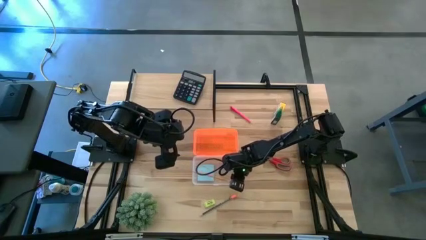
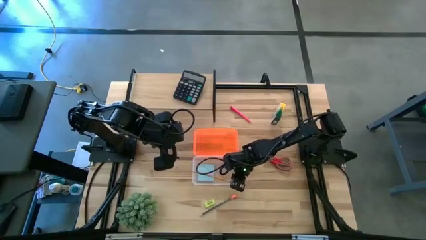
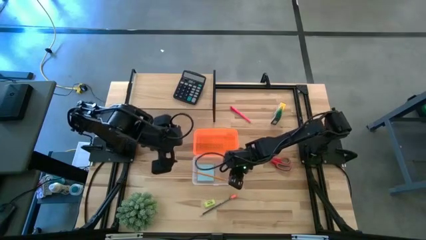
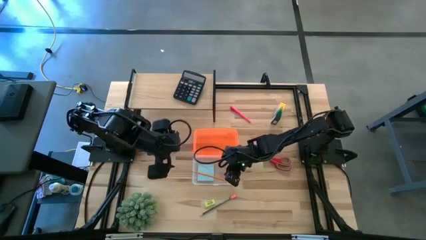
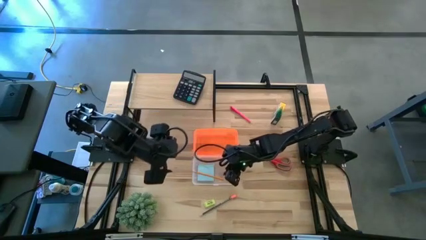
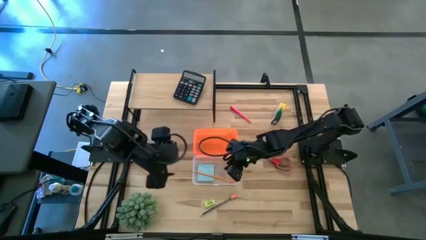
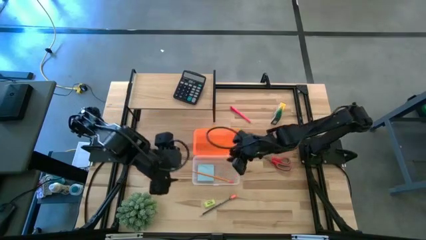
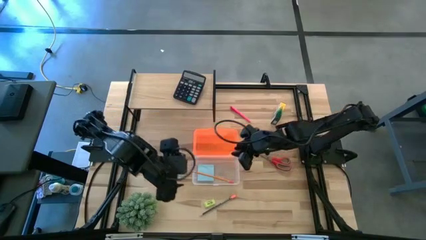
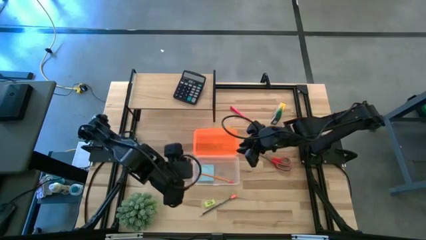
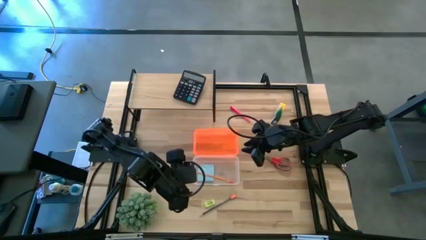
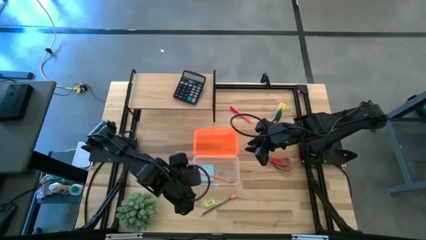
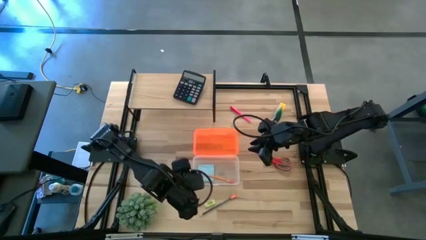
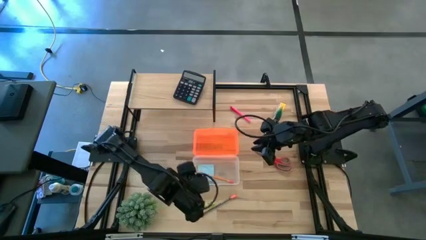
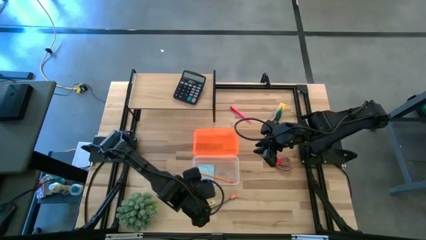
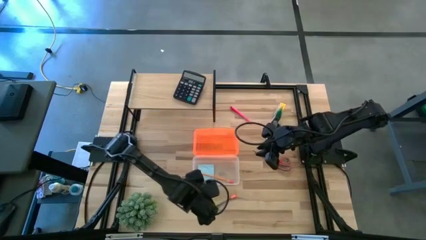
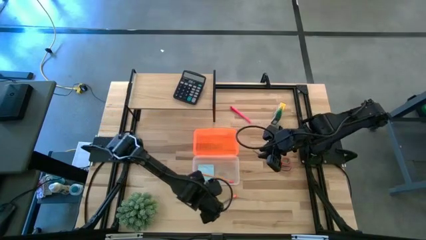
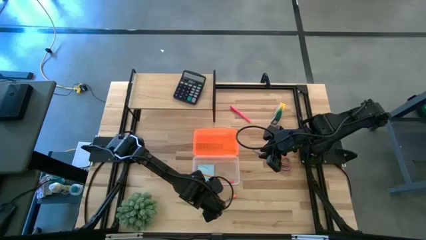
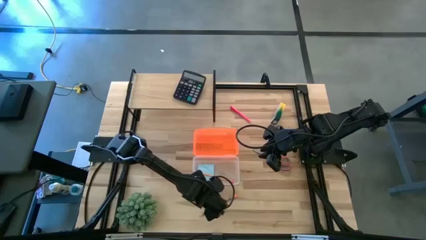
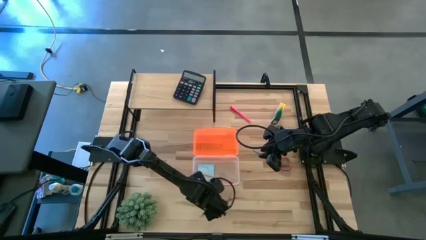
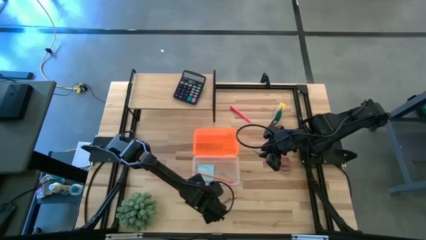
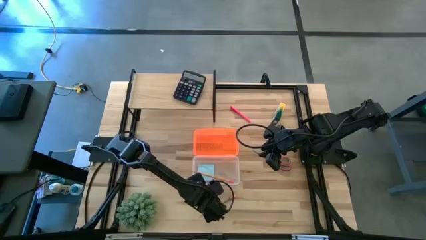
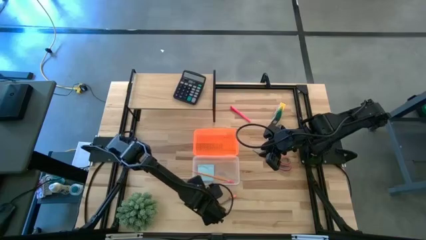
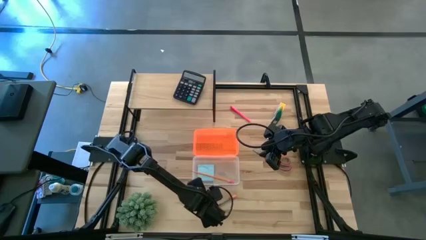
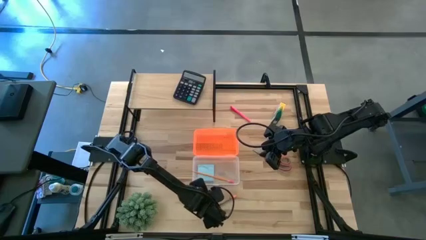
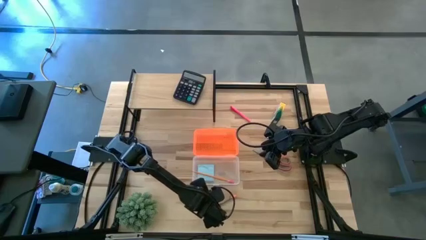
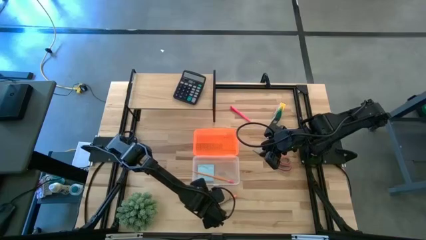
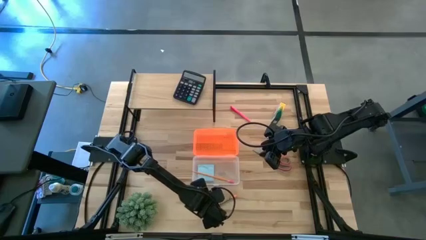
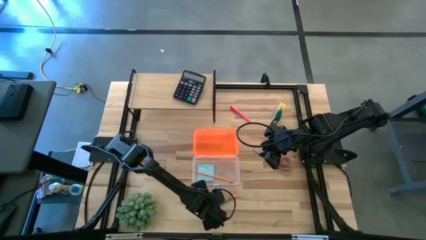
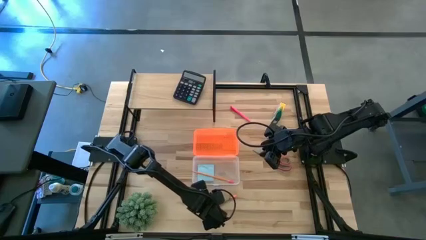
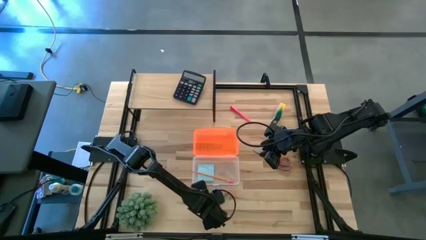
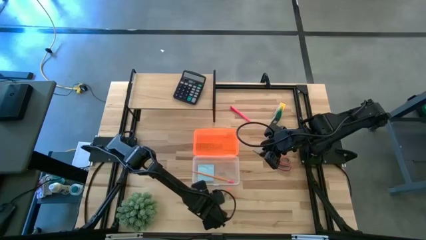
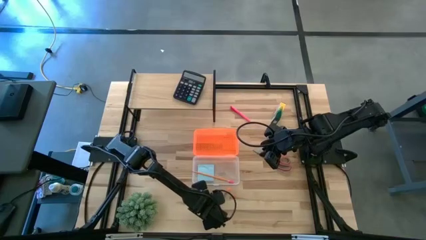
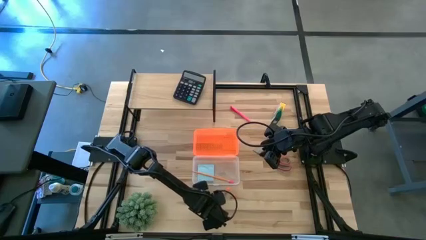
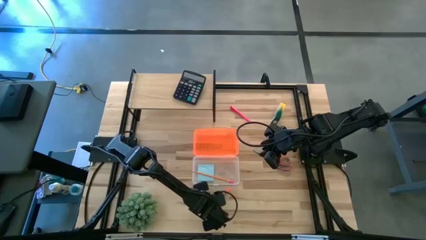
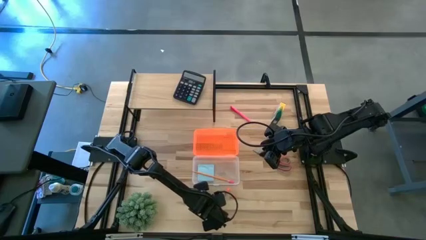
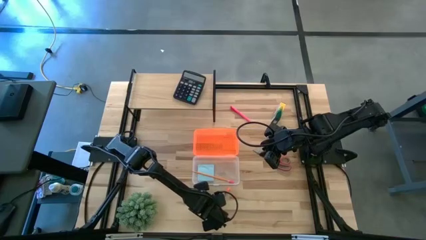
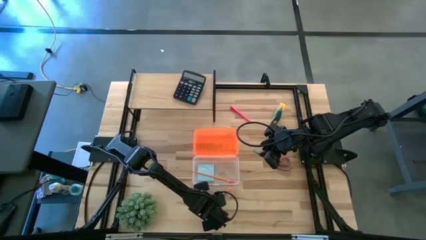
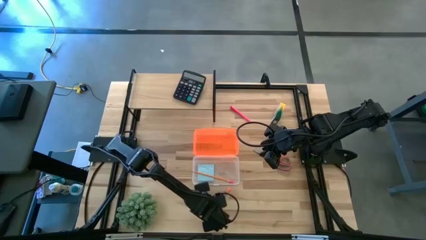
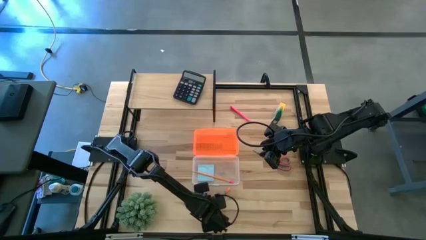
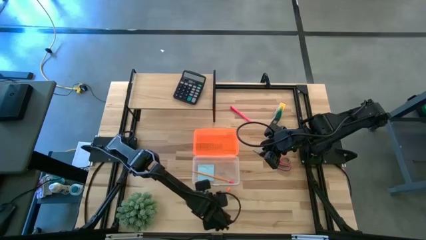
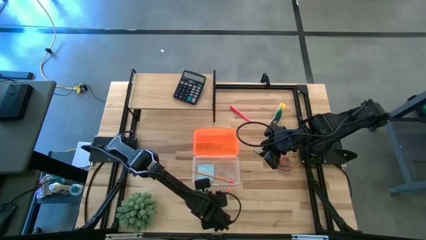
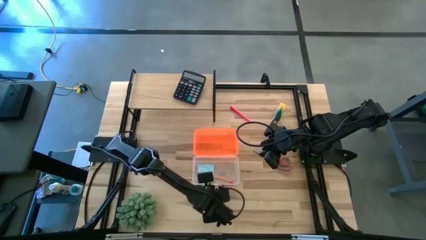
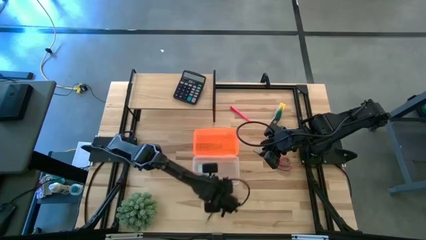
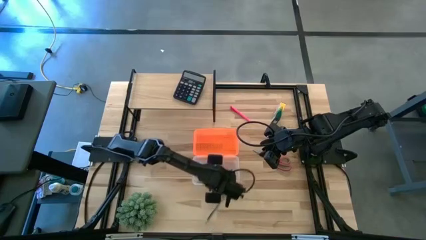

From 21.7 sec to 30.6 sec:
Task: Pack school essentials
Put the green eraser into the school supply box

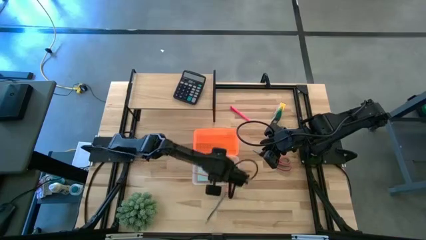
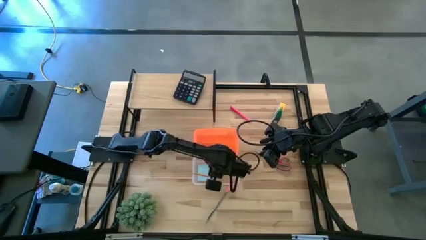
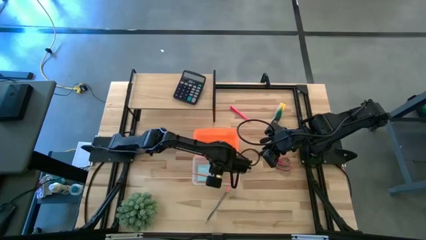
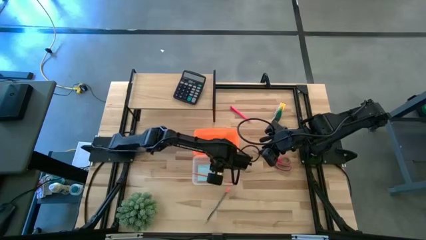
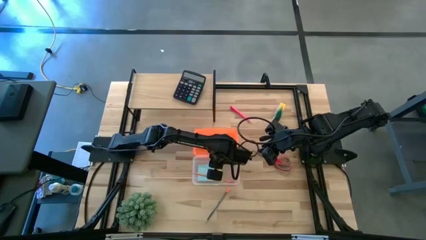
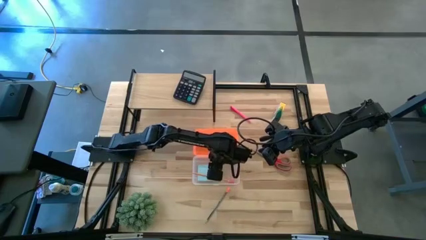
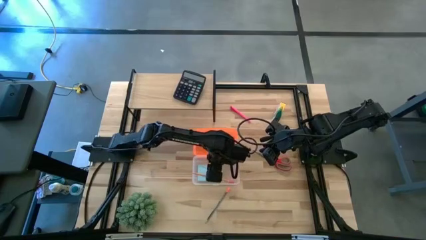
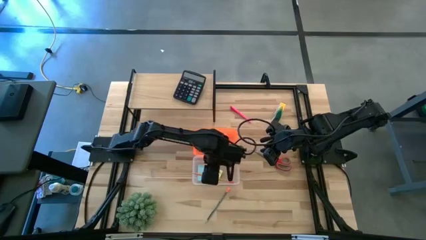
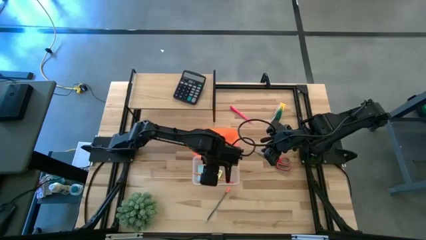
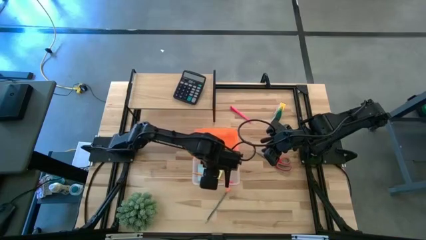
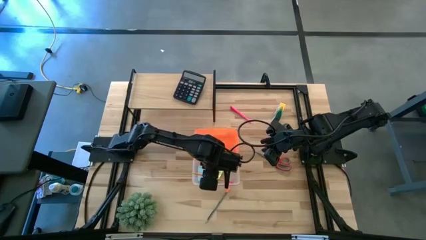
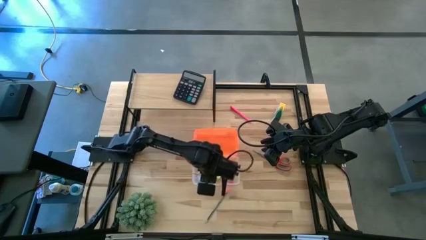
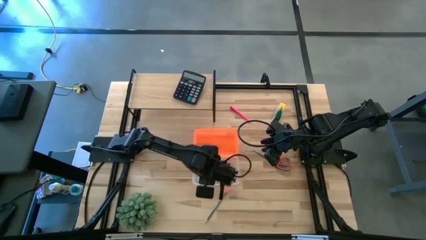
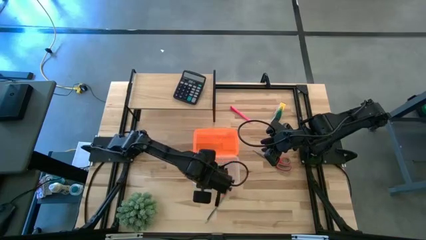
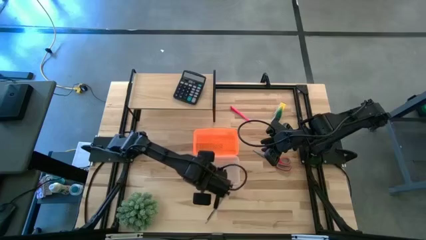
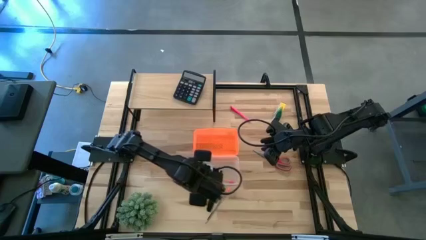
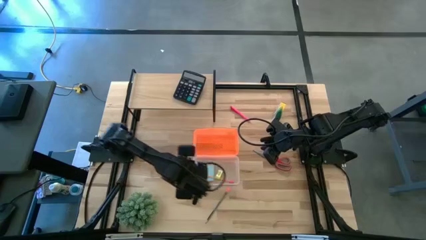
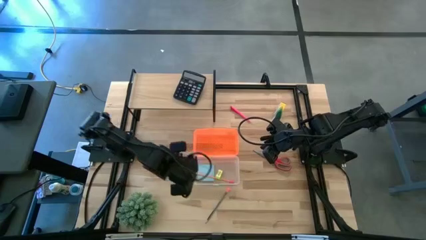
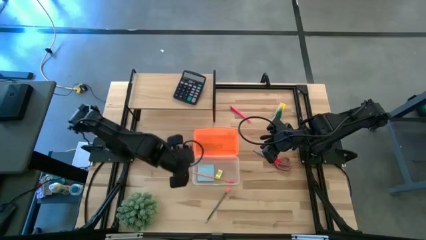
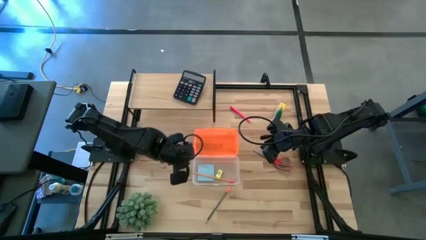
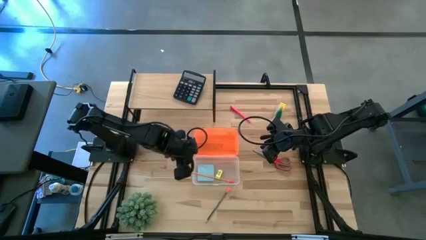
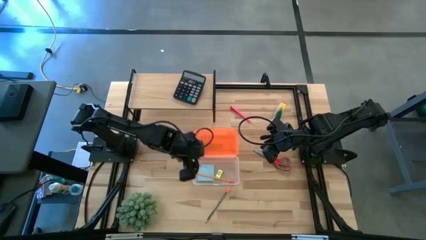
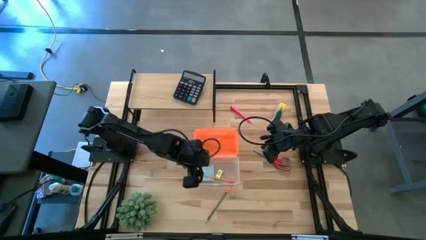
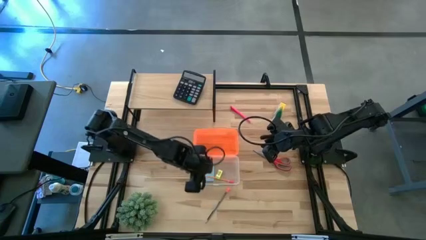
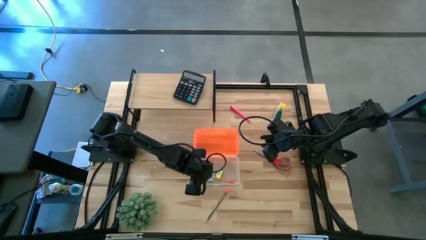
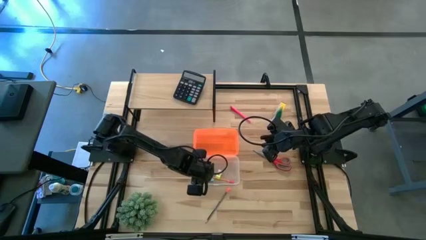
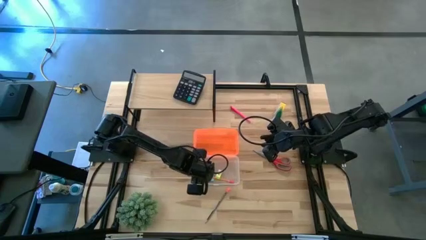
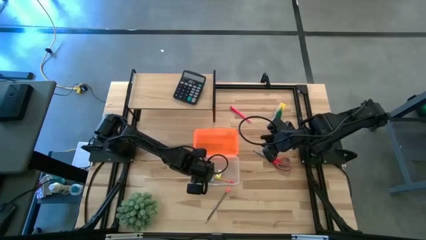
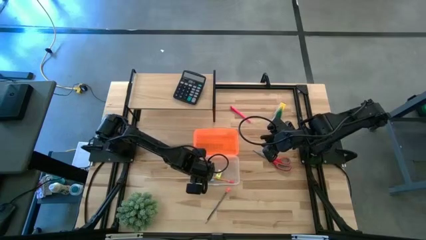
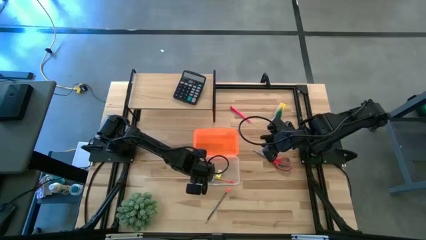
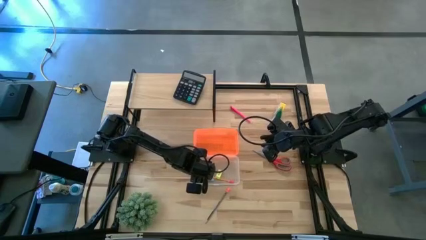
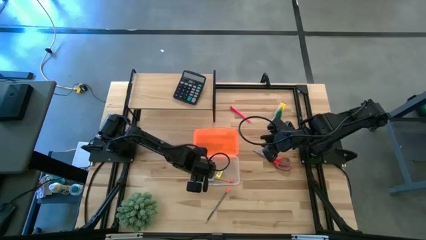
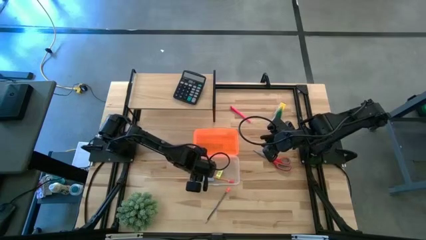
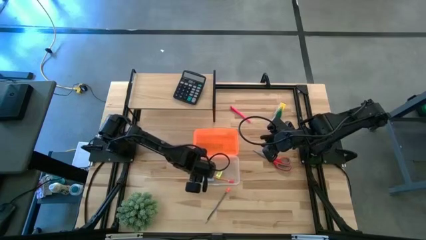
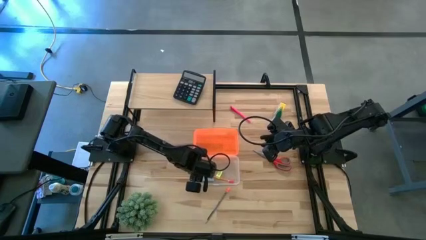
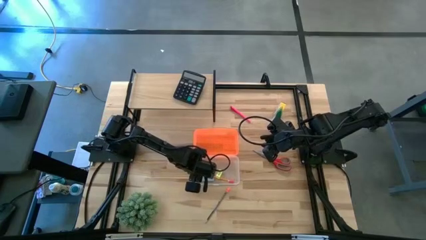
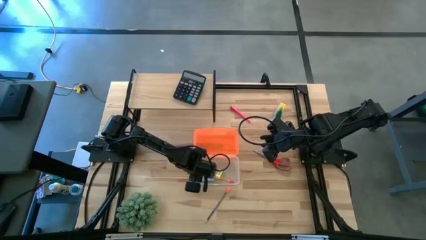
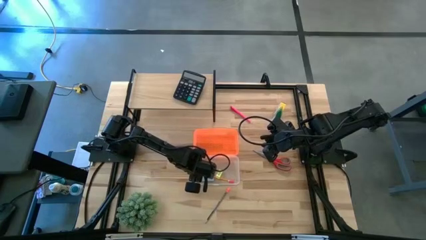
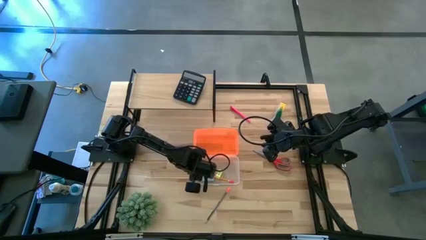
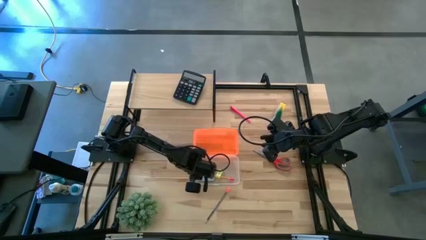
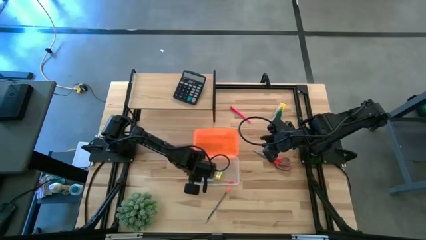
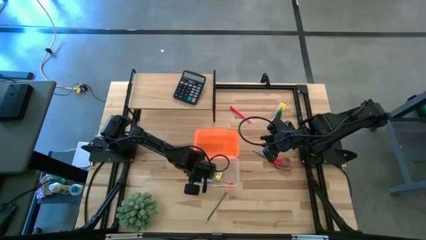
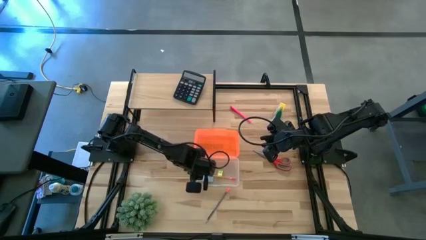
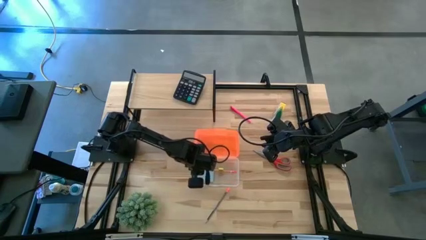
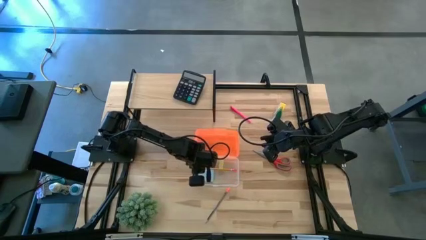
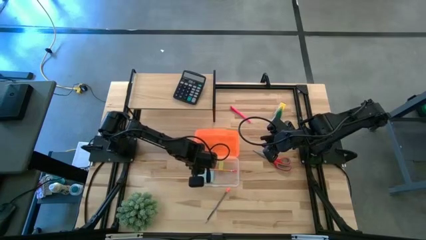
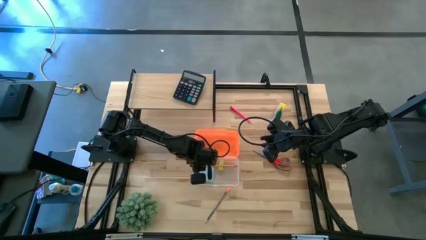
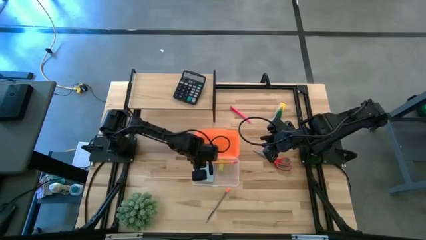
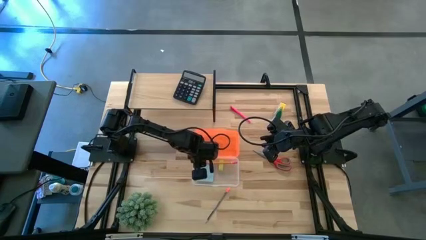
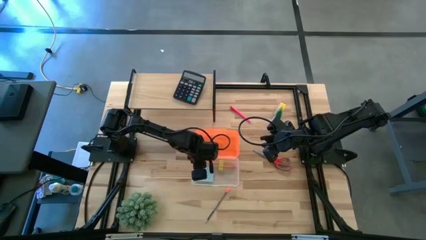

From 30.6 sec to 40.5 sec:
Adjust the pencil into the school supply box
